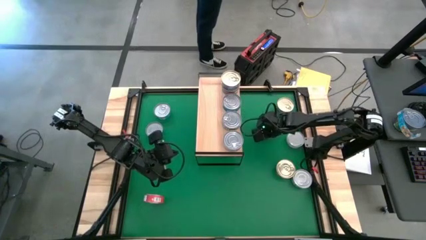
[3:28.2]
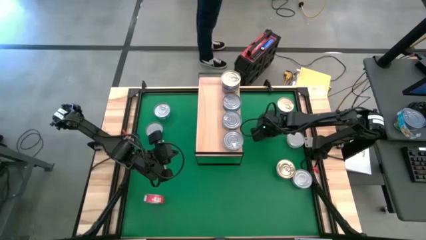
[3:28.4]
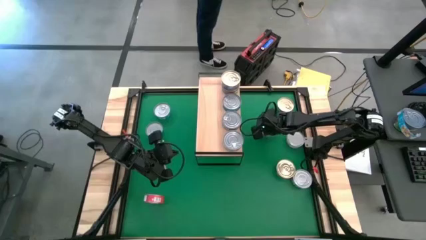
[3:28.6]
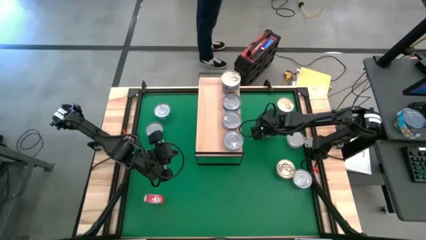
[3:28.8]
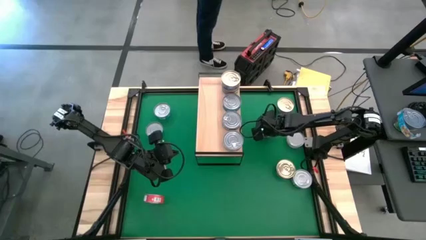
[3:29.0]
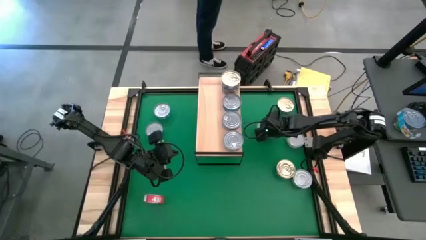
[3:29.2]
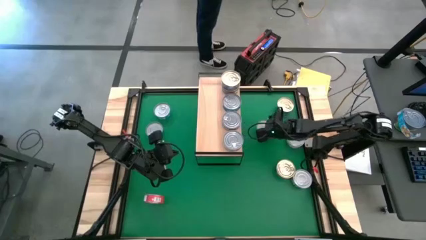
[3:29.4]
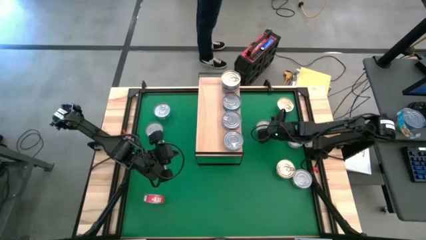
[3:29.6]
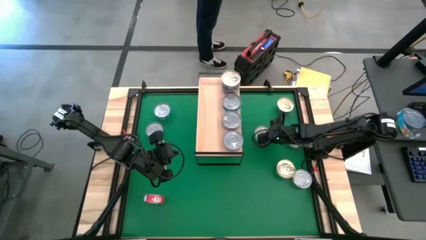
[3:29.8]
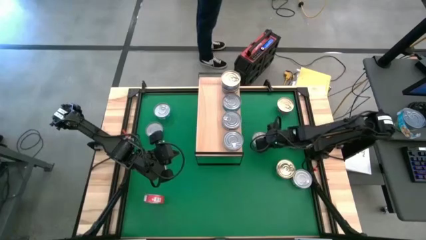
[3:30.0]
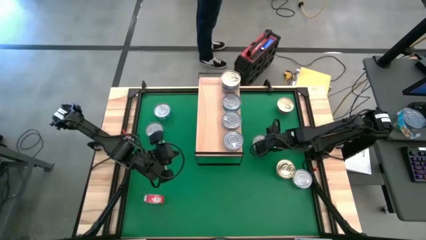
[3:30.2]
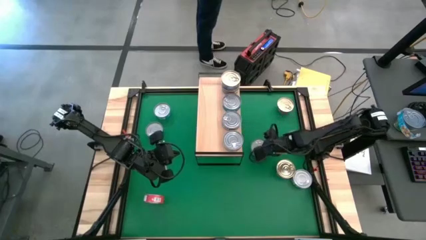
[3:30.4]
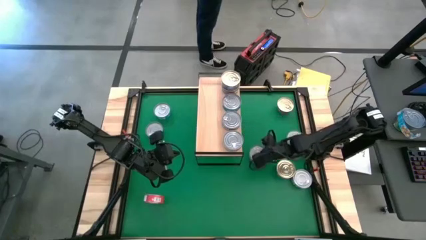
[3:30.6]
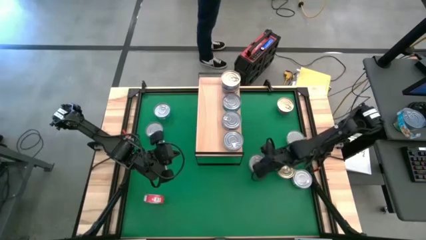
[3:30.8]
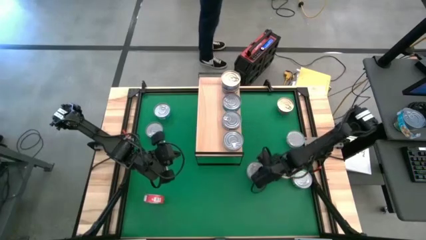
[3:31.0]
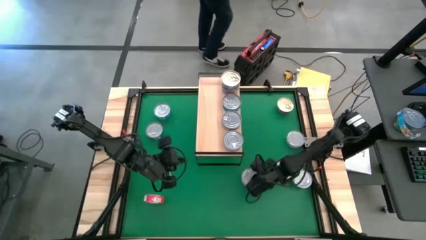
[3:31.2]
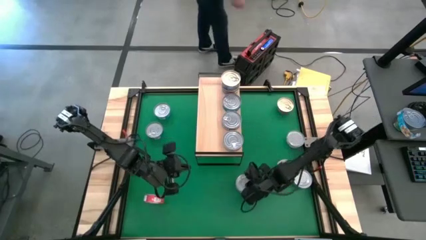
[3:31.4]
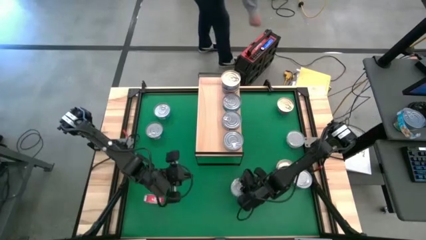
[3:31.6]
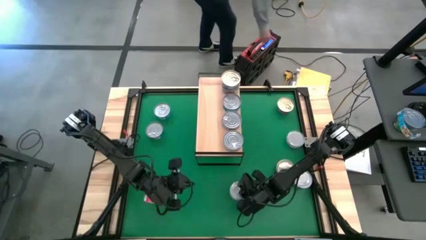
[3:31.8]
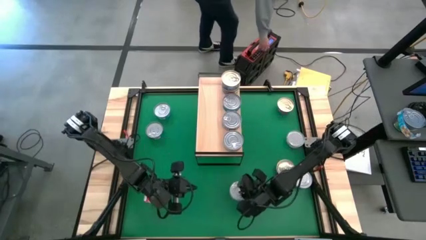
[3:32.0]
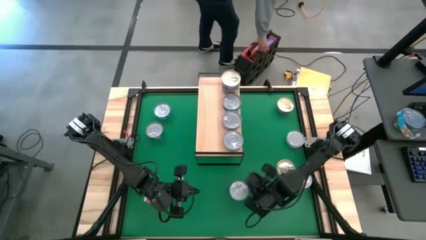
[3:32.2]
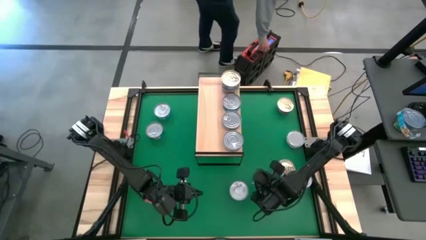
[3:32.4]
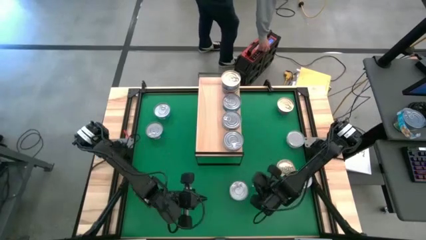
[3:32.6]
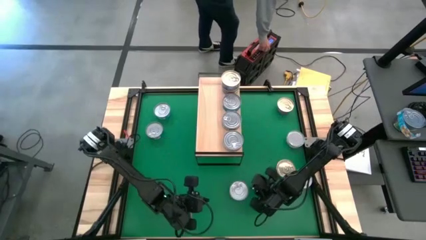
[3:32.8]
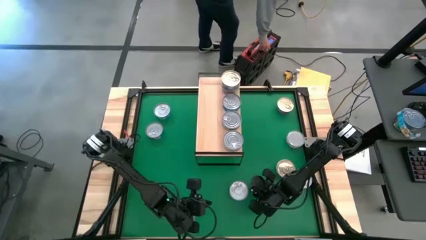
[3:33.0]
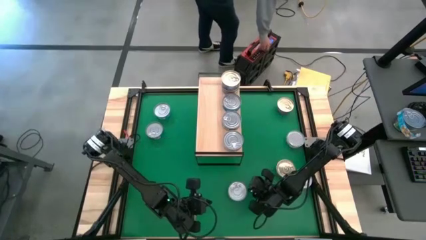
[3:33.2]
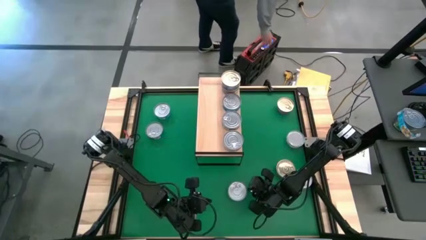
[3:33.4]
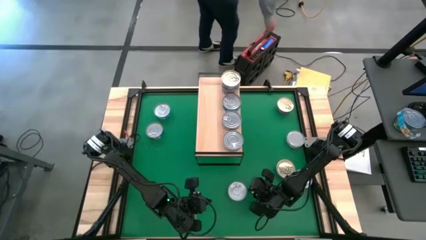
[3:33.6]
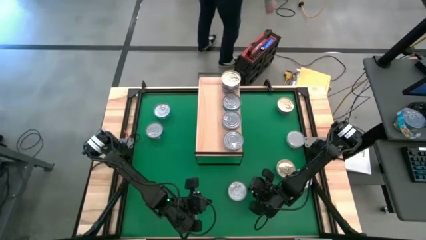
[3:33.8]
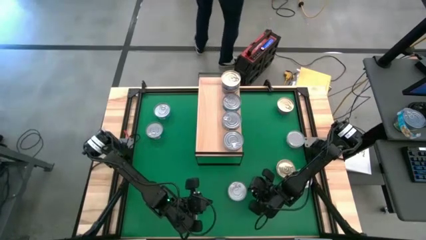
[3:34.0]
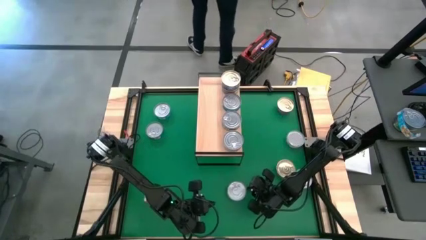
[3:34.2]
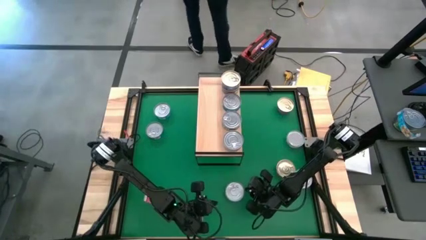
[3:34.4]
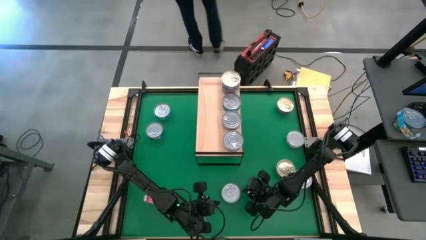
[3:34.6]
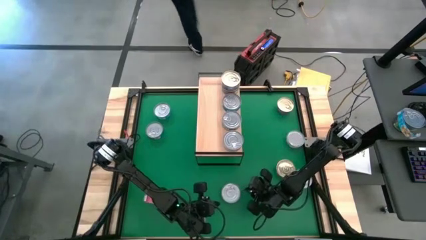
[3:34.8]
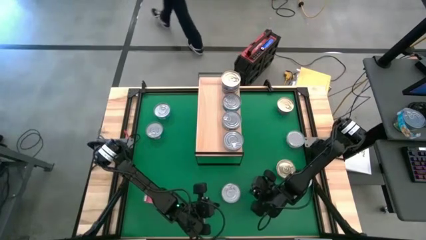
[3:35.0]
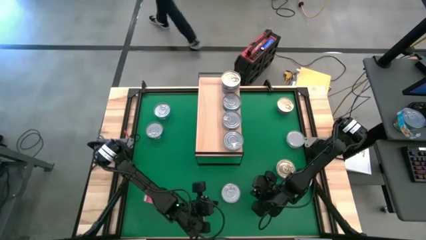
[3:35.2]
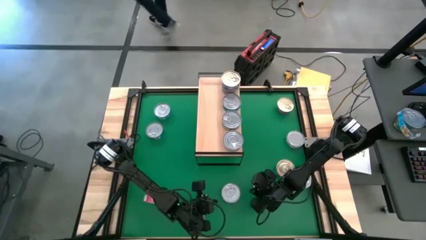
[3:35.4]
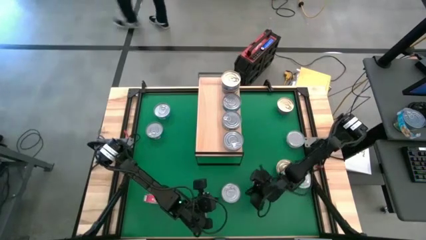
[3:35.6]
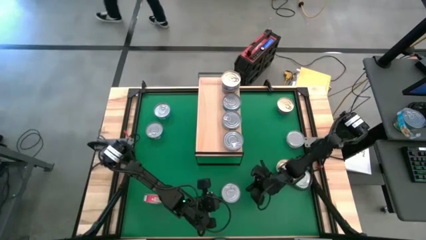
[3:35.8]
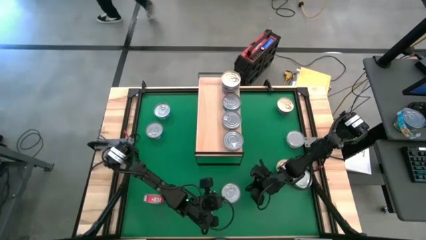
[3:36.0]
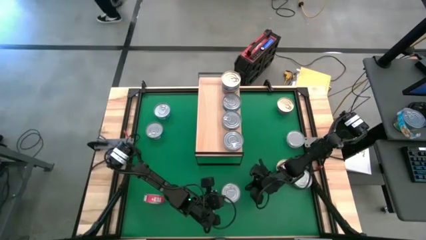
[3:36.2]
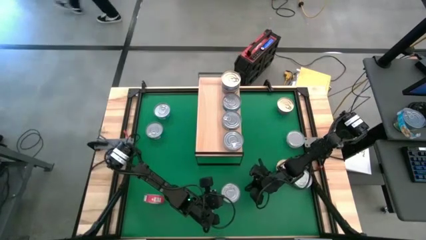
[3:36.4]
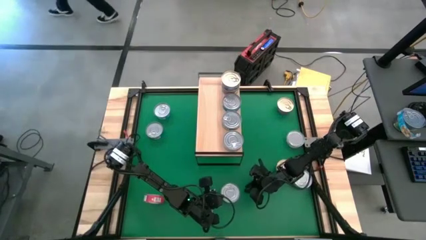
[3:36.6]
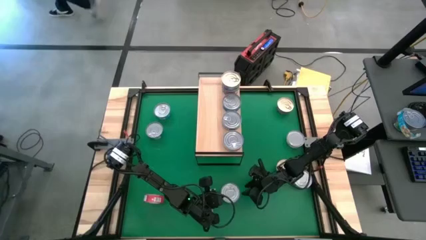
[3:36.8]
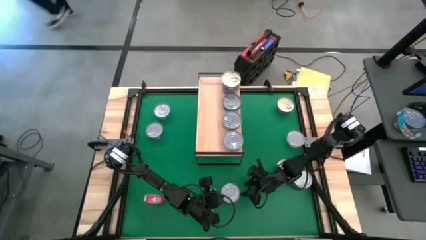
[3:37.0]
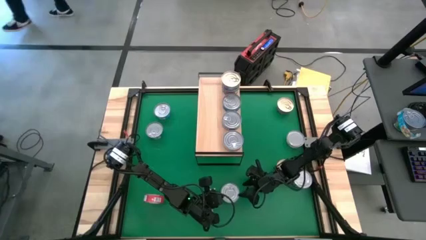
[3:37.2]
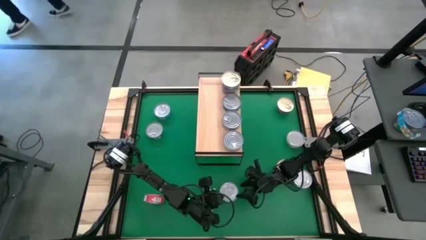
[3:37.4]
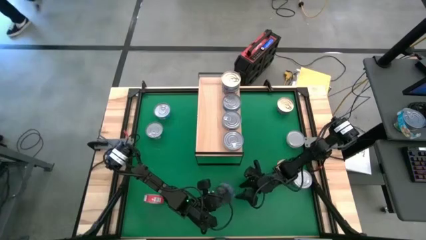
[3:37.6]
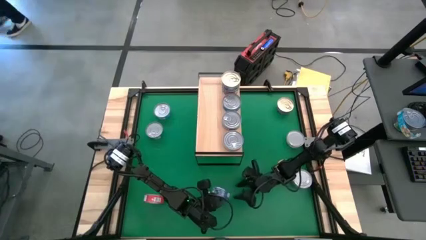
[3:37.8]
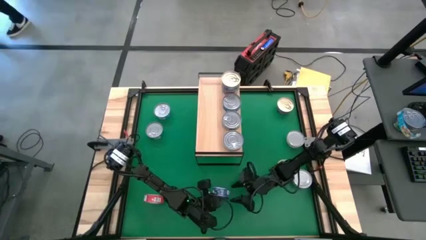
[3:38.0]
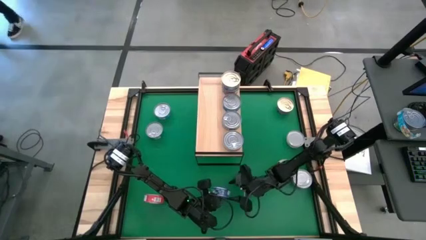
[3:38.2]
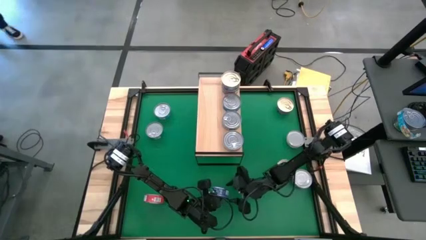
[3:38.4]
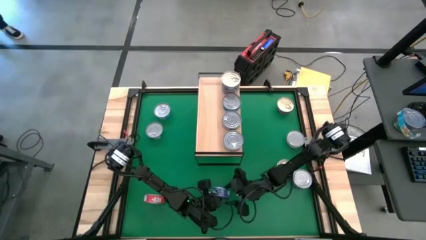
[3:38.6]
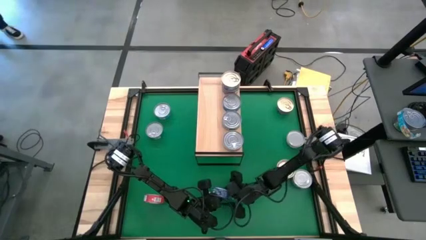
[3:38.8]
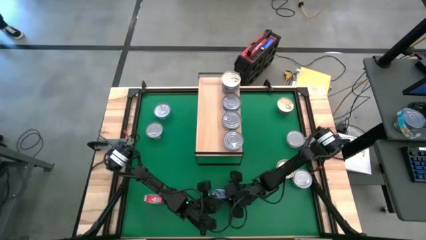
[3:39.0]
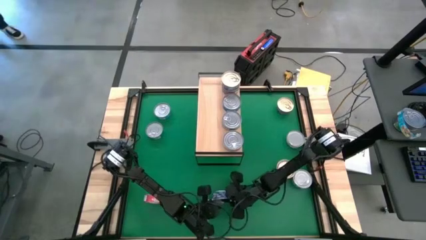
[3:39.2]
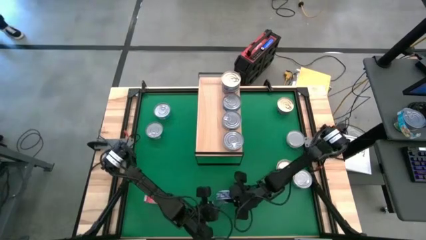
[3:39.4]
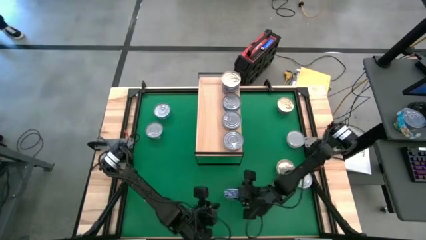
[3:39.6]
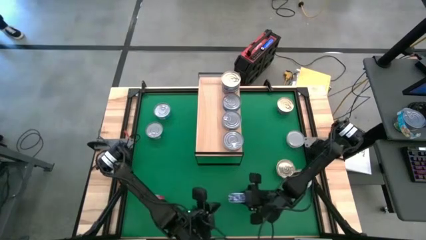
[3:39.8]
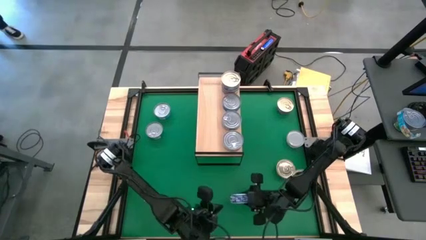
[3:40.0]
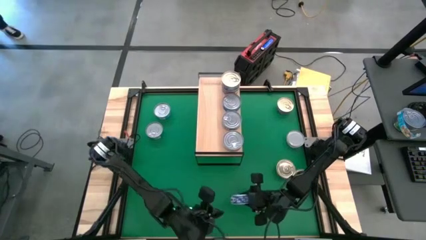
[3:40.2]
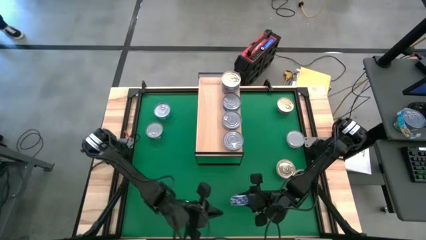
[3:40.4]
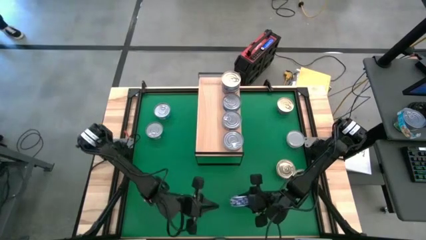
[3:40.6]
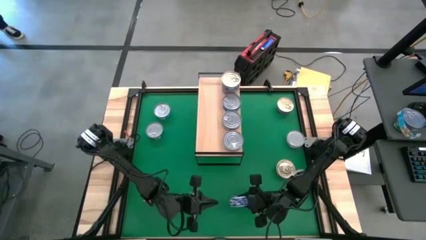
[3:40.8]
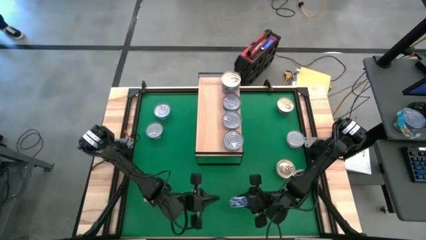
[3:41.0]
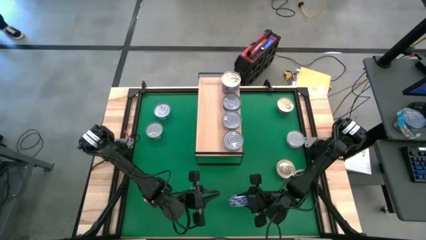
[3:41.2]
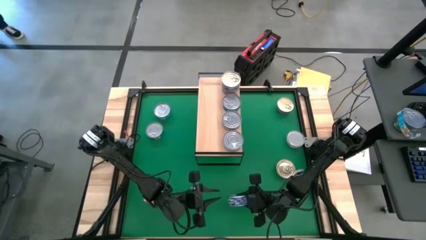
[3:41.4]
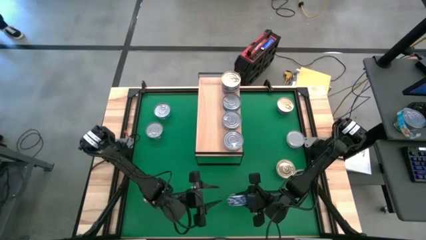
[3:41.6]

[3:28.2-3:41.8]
Task: Stack canned seafood by type on shelf
Put the top blue tuna can on the shelf
